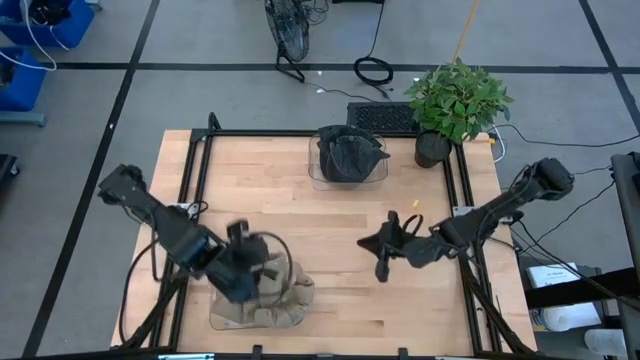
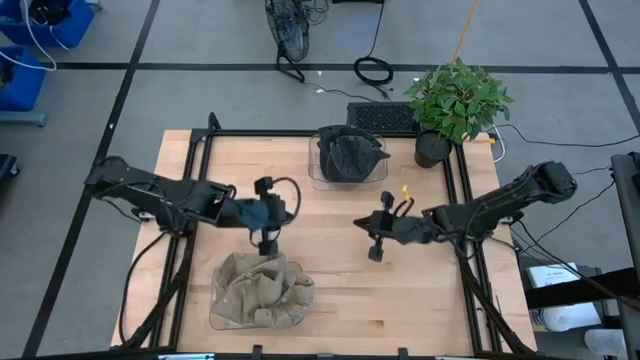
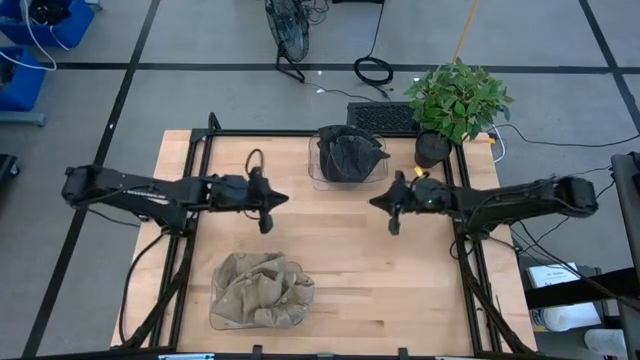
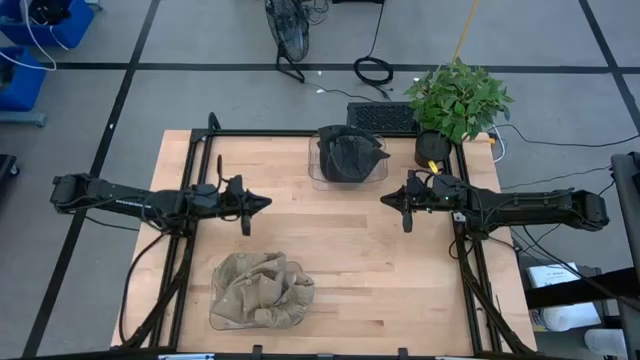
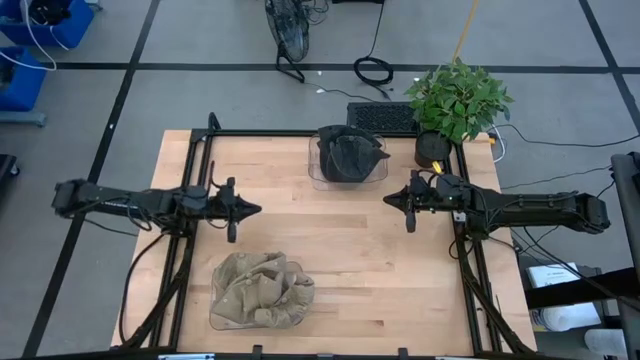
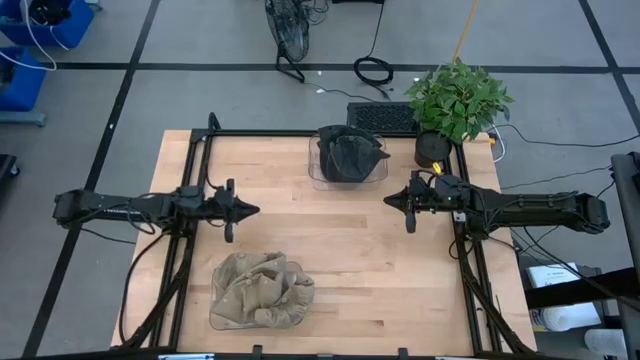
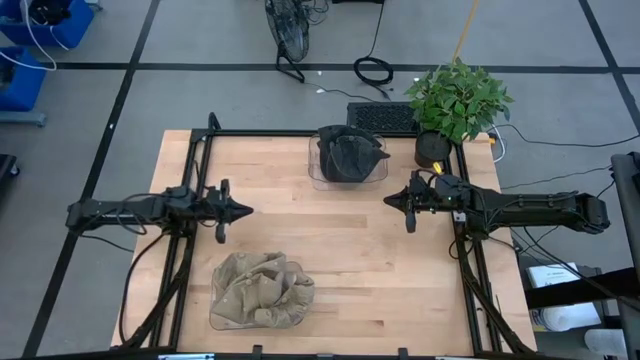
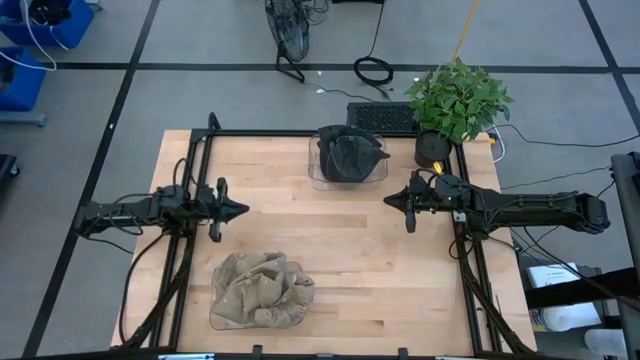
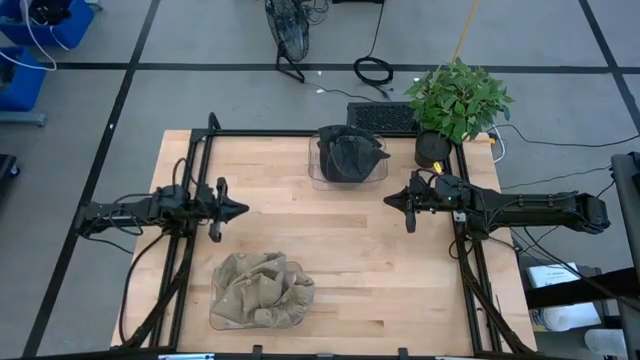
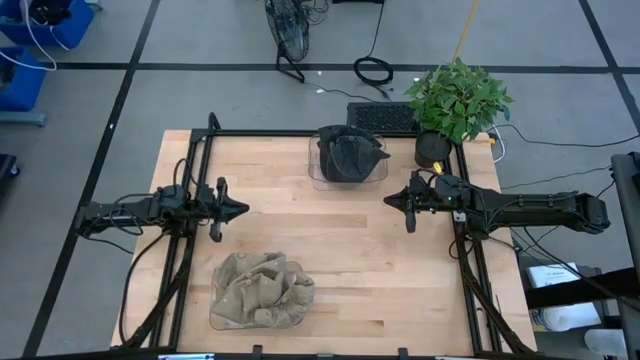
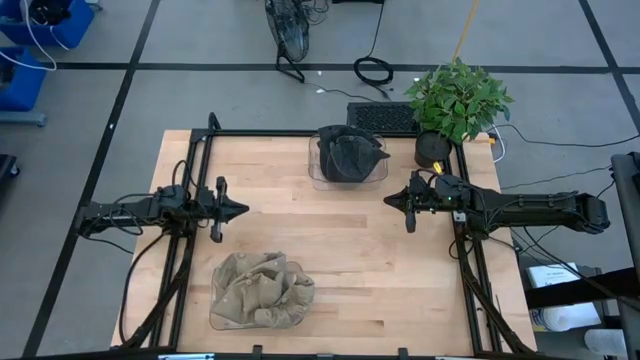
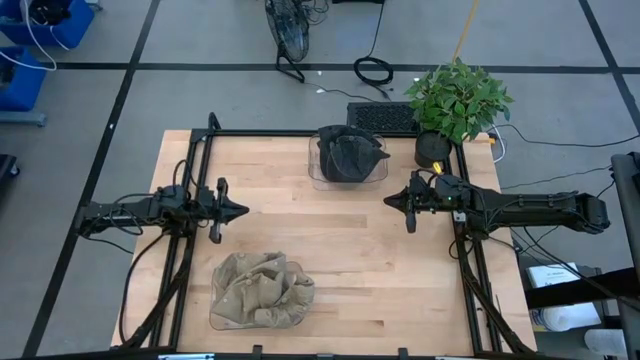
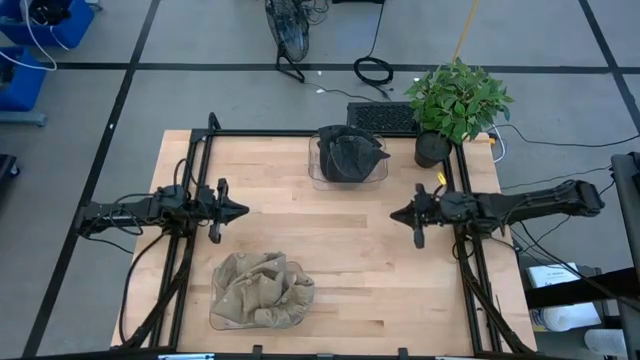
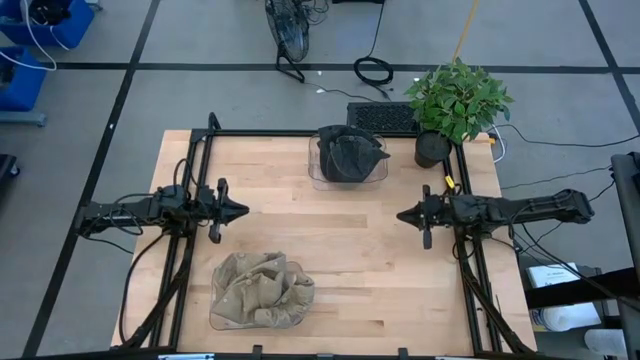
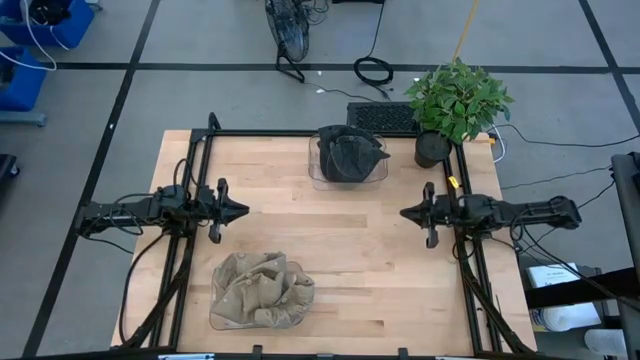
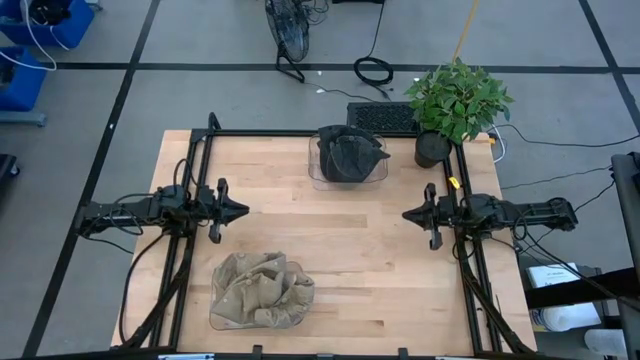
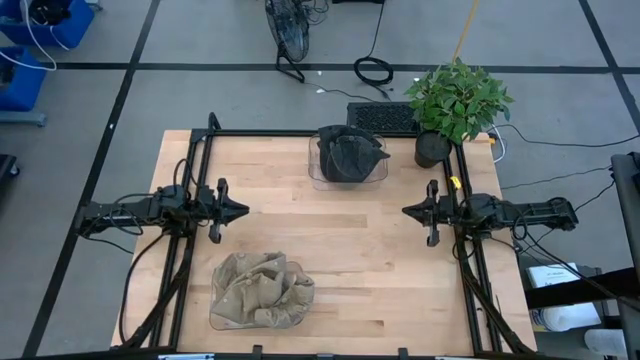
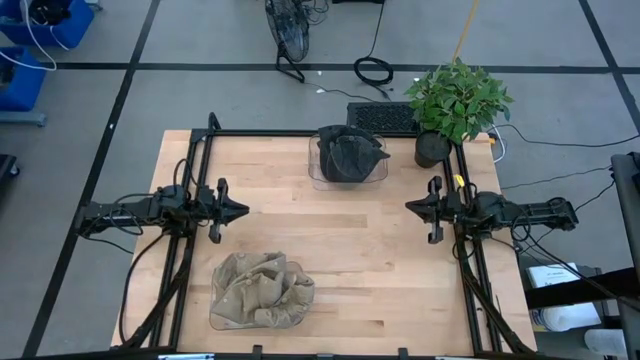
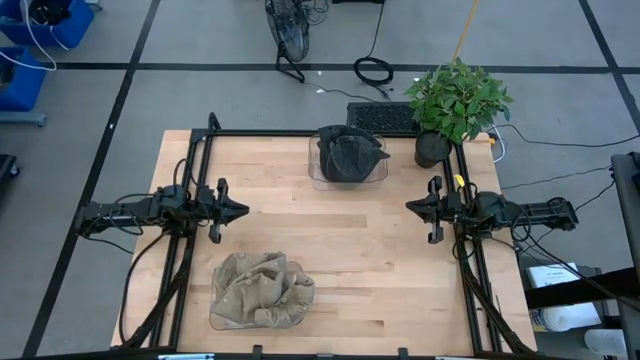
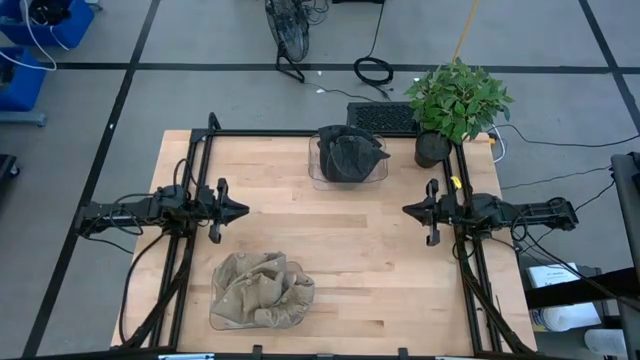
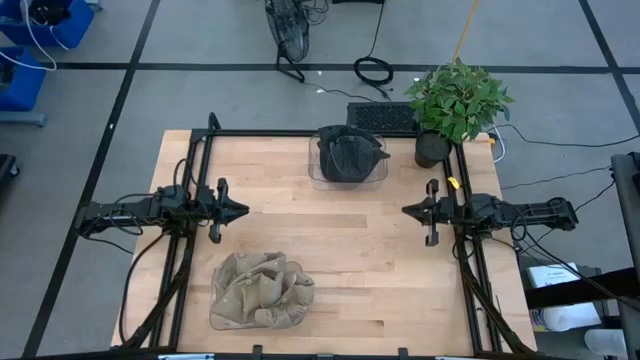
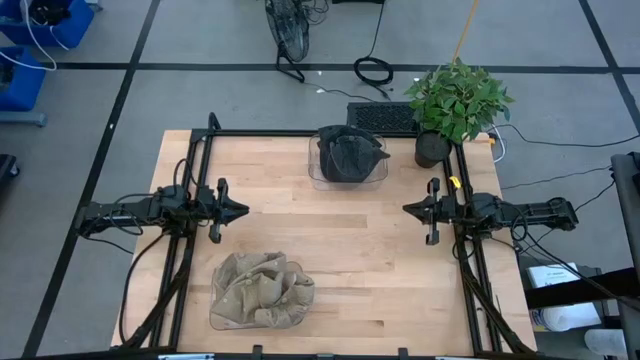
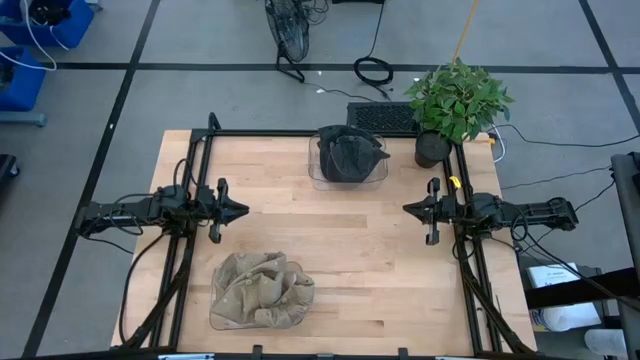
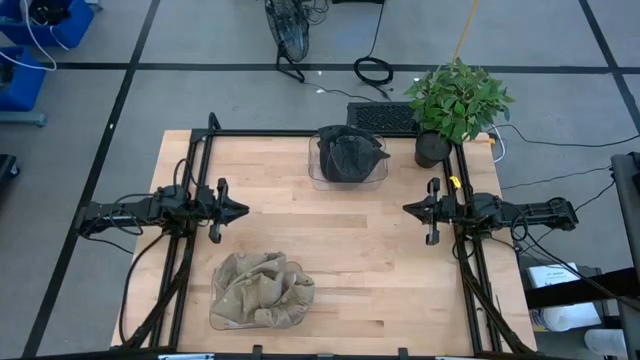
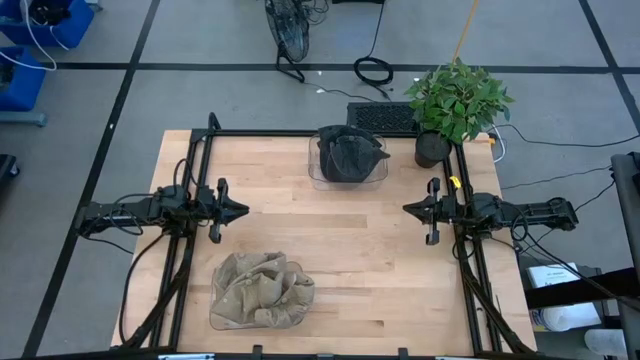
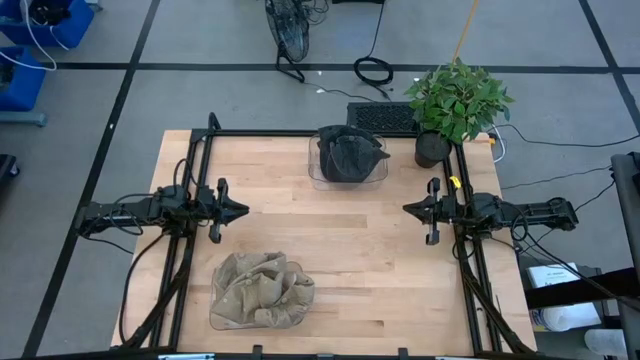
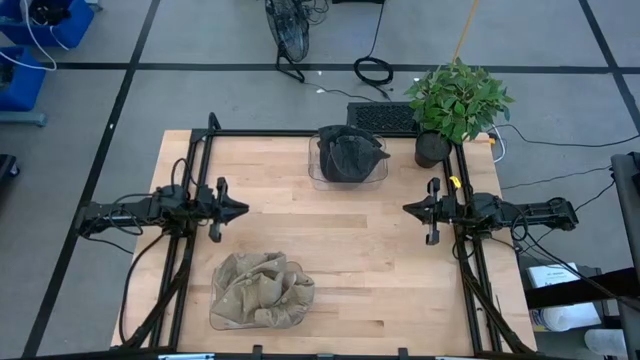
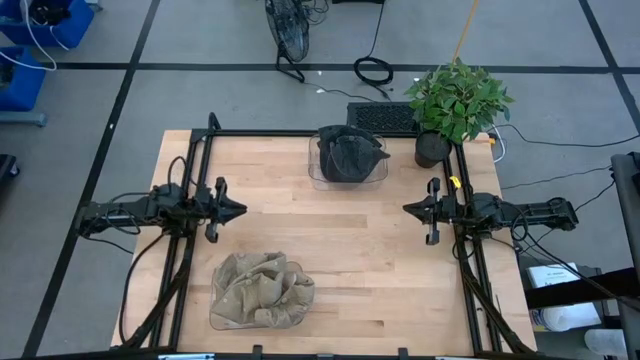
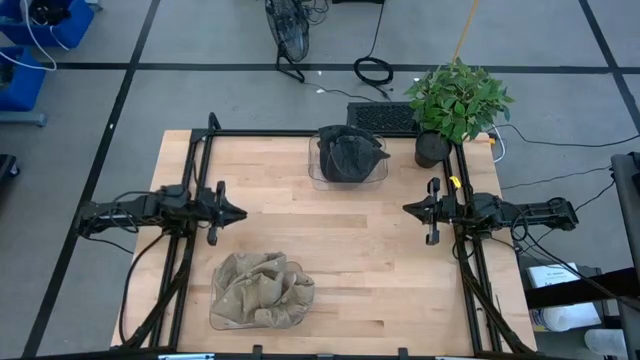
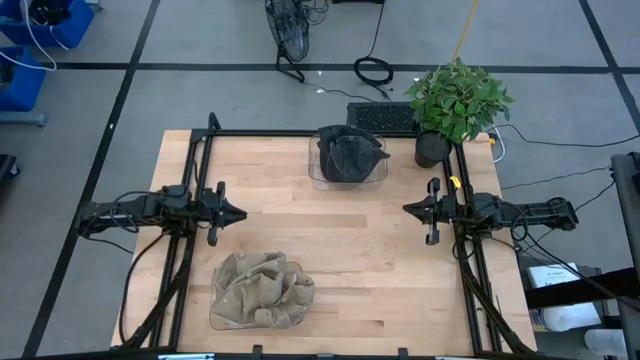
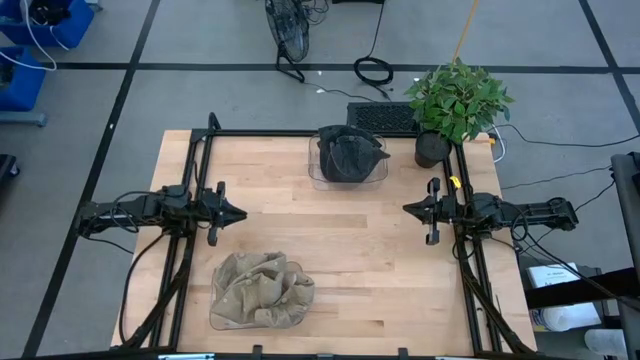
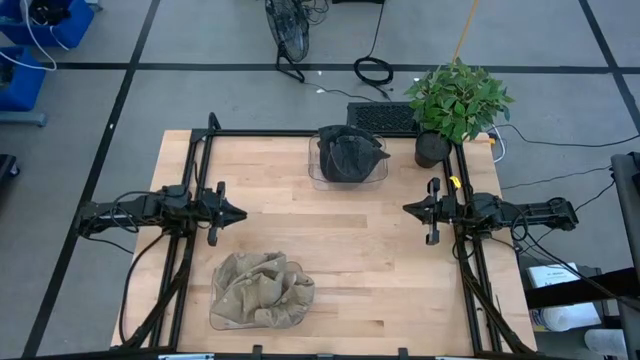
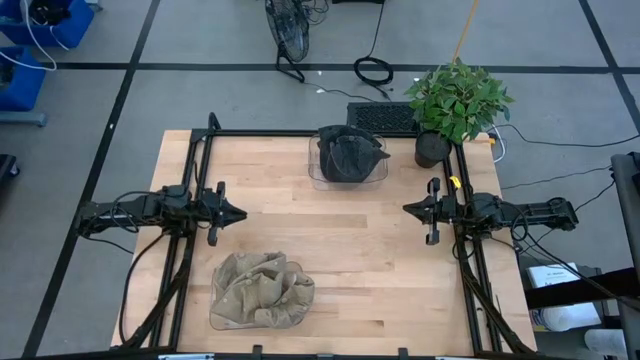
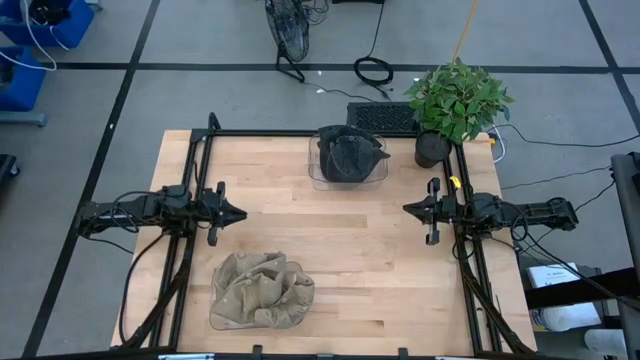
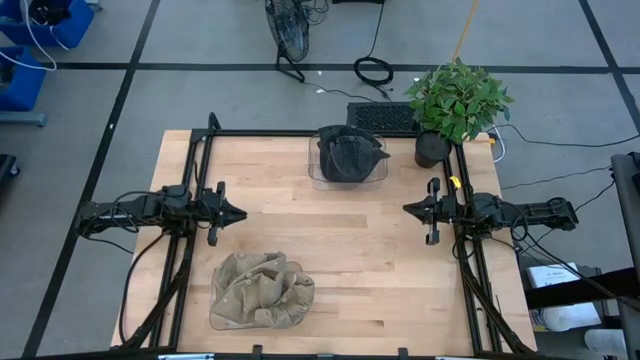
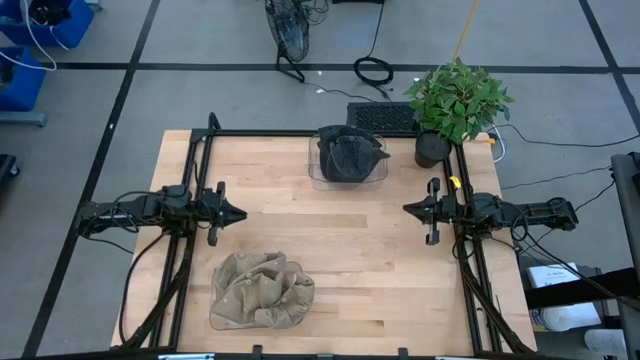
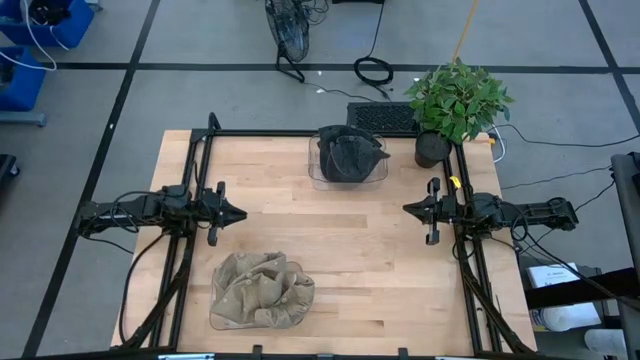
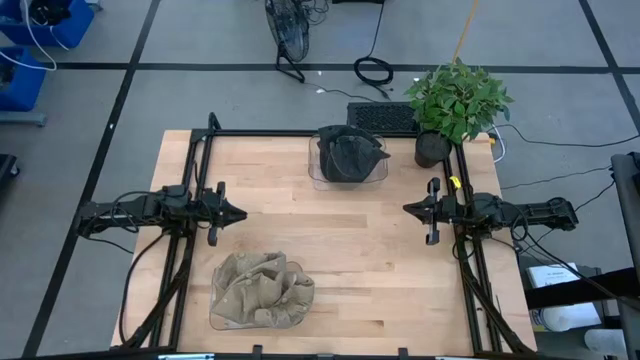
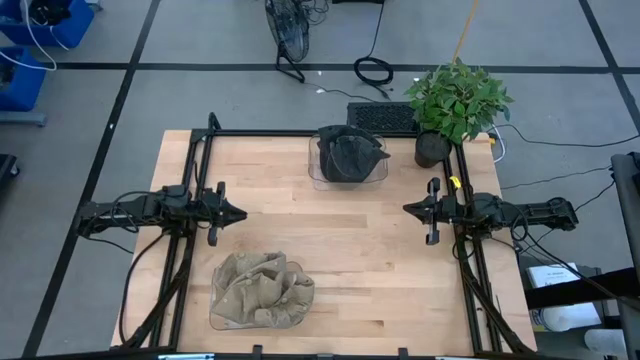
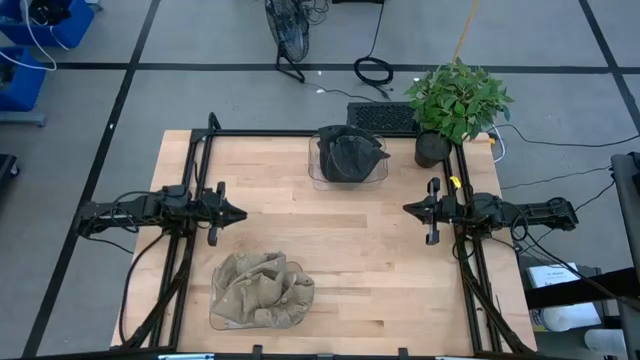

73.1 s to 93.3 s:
Task: Pick & Place hat
Return to Home Position

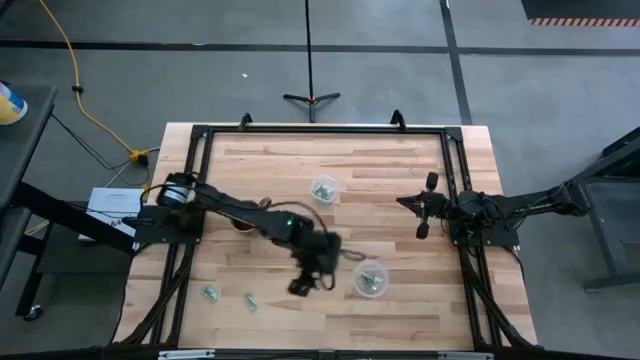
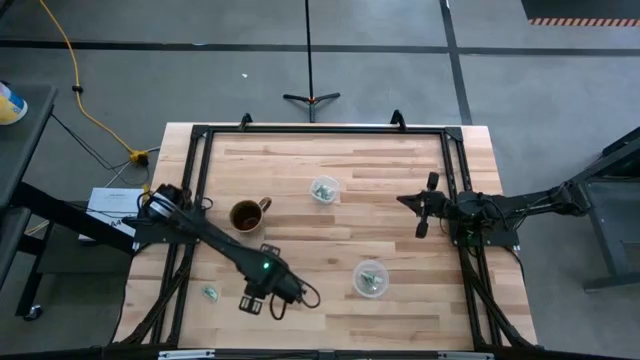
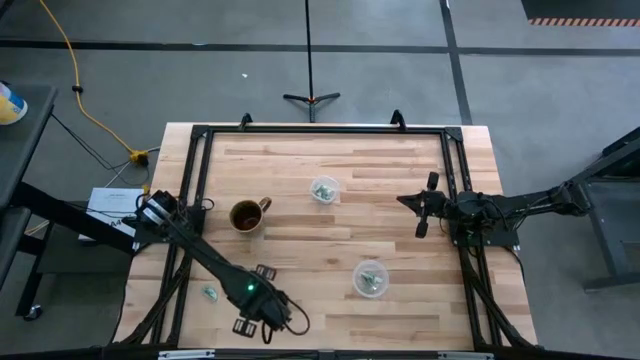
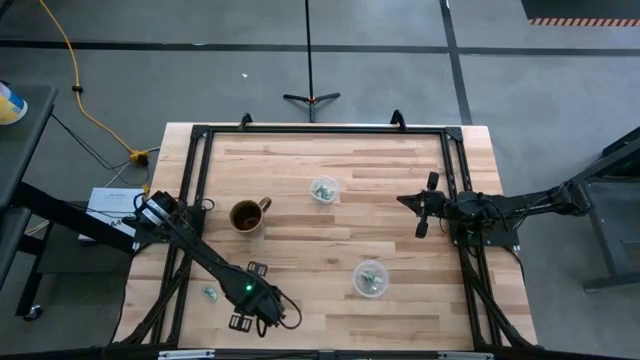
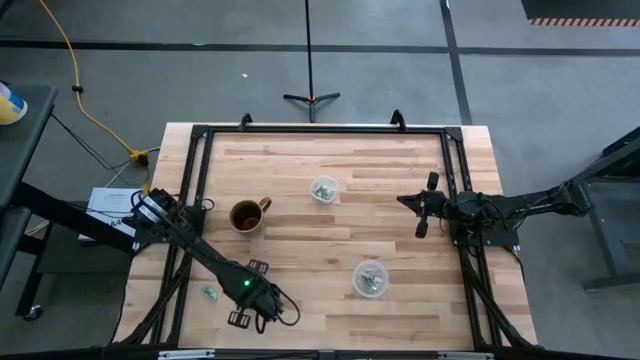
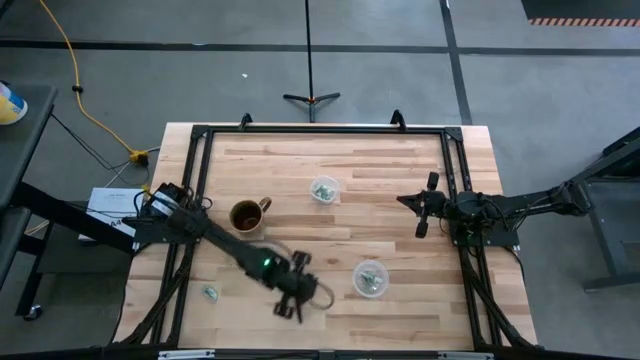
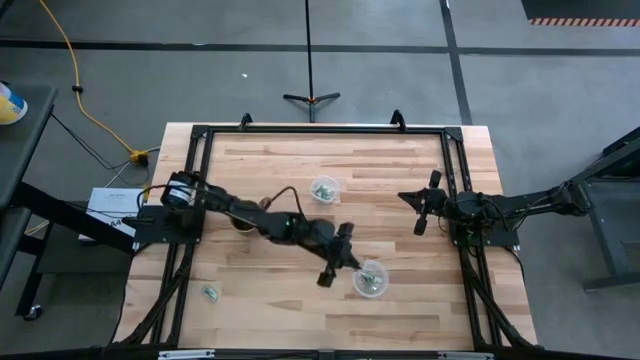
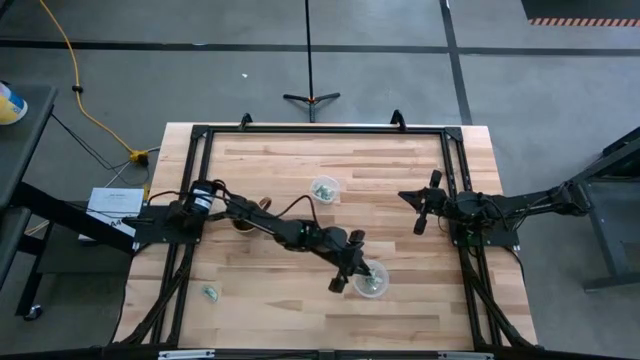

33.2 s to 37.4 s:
Task: Pick and place Stevia / Truvia into bins
Put the stevia packet into the bottom transparent container
